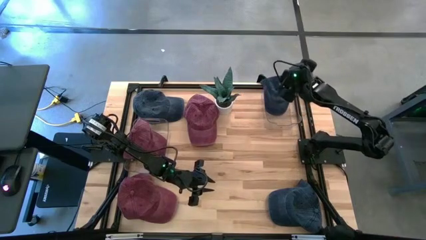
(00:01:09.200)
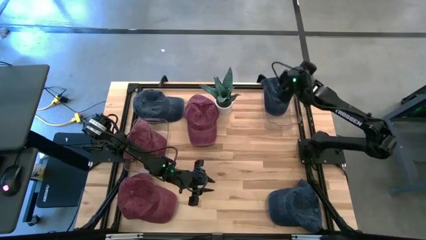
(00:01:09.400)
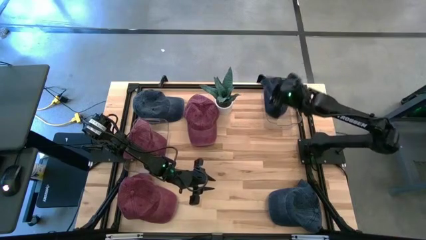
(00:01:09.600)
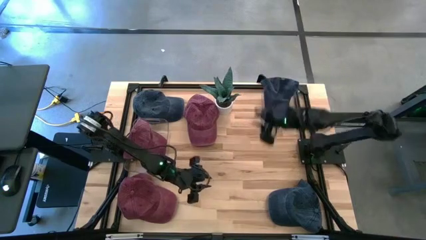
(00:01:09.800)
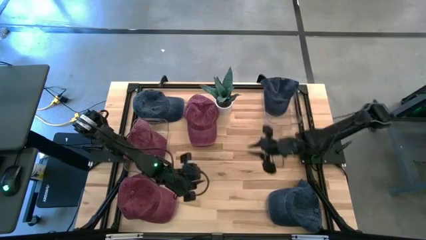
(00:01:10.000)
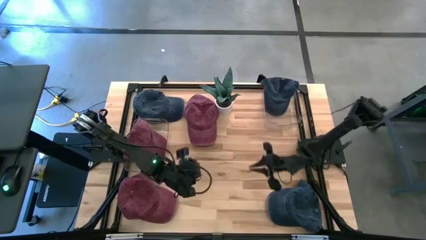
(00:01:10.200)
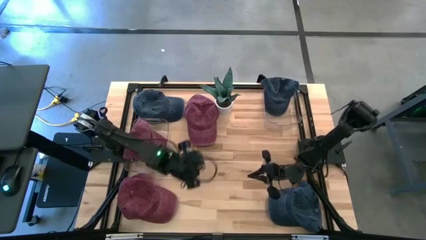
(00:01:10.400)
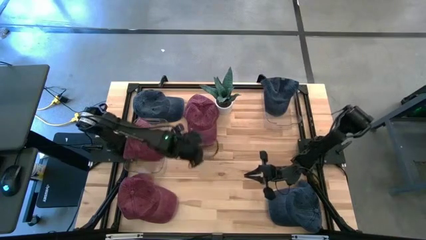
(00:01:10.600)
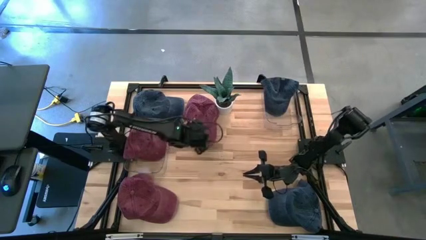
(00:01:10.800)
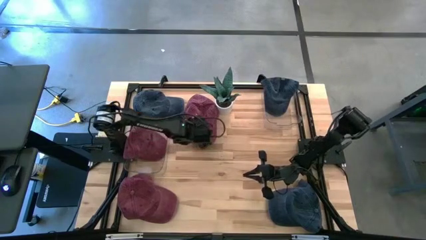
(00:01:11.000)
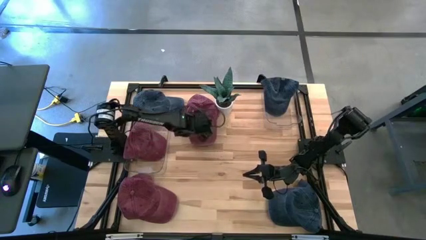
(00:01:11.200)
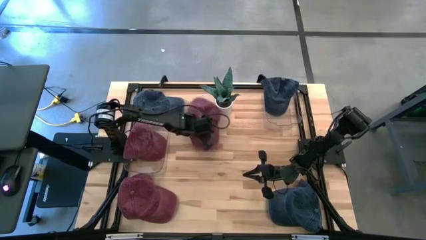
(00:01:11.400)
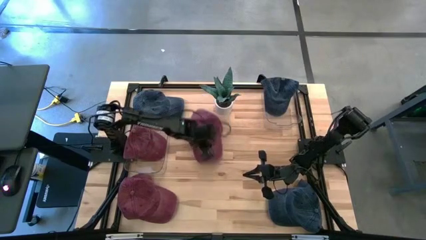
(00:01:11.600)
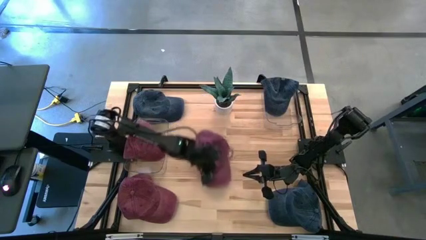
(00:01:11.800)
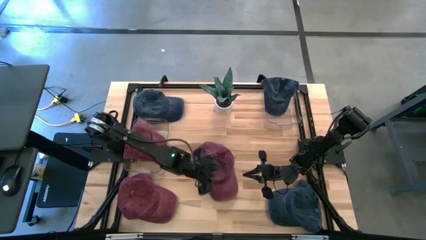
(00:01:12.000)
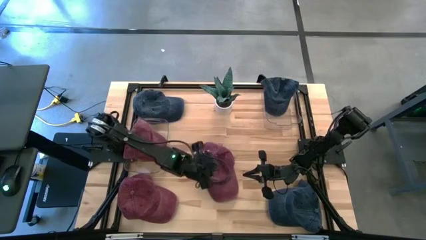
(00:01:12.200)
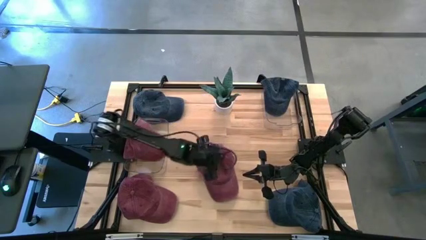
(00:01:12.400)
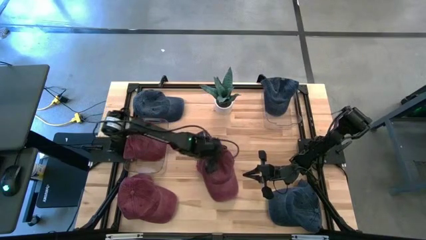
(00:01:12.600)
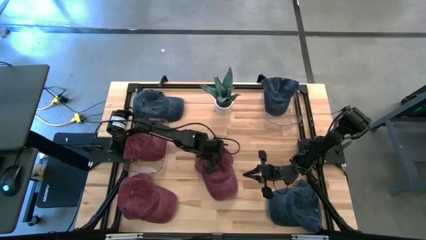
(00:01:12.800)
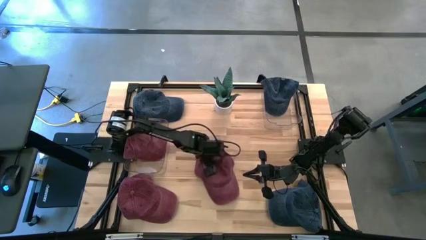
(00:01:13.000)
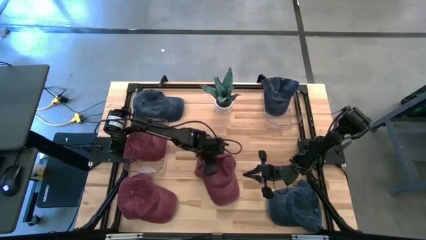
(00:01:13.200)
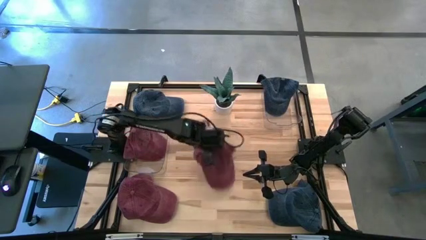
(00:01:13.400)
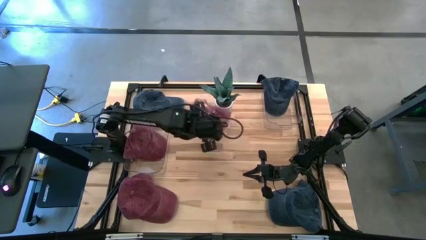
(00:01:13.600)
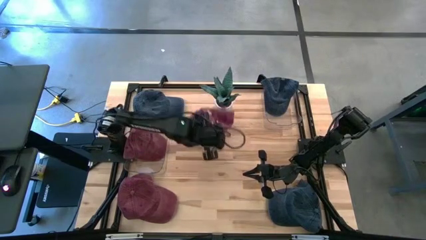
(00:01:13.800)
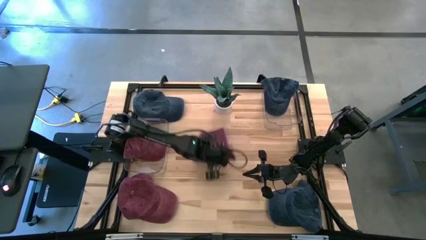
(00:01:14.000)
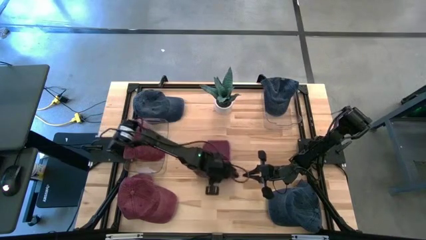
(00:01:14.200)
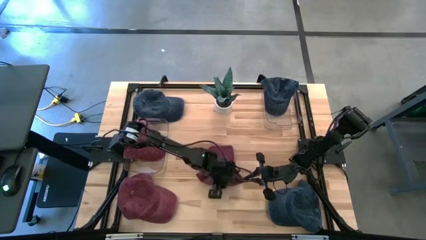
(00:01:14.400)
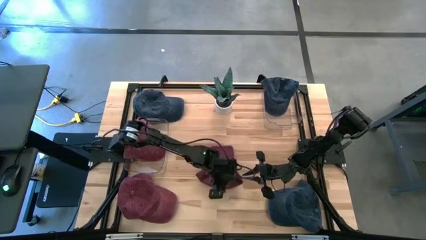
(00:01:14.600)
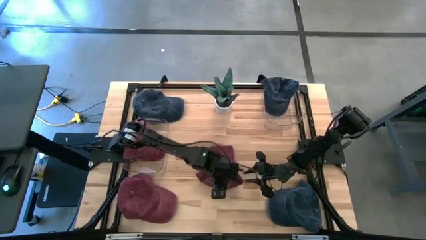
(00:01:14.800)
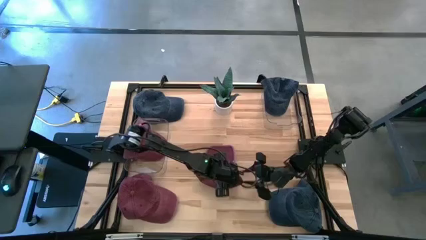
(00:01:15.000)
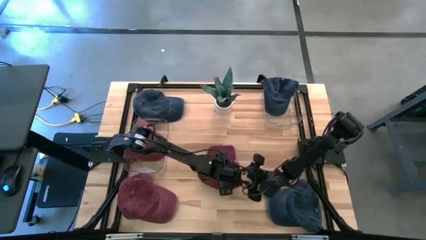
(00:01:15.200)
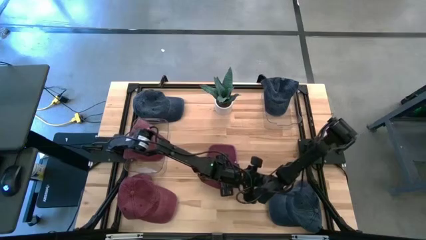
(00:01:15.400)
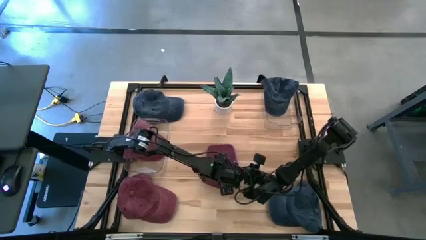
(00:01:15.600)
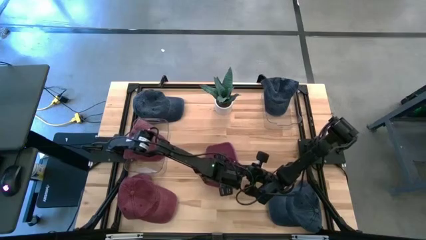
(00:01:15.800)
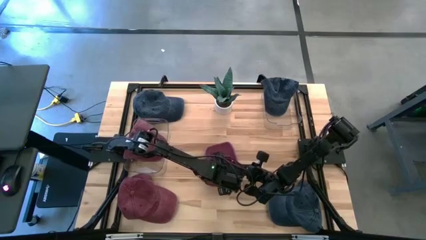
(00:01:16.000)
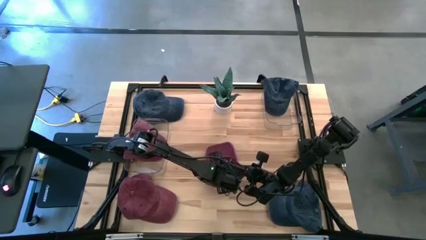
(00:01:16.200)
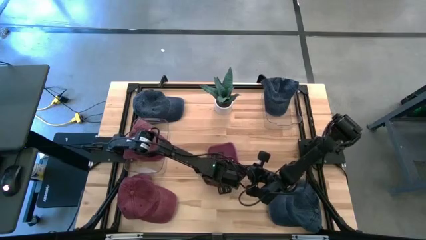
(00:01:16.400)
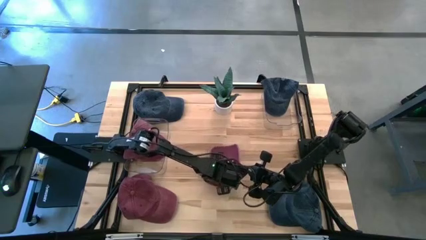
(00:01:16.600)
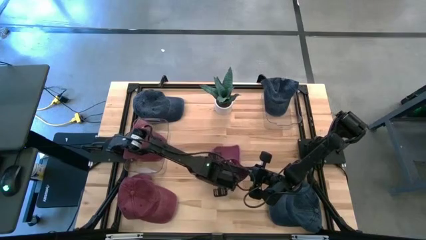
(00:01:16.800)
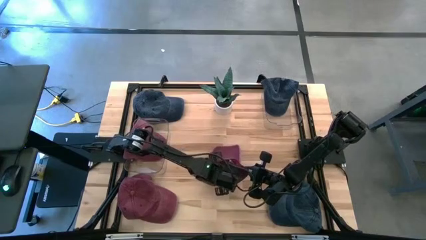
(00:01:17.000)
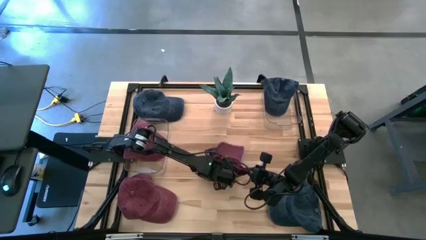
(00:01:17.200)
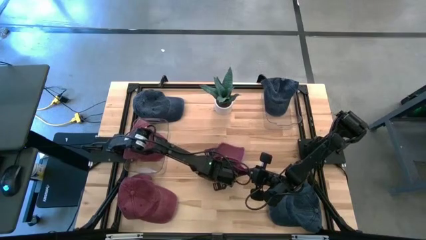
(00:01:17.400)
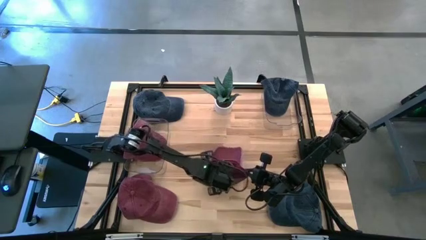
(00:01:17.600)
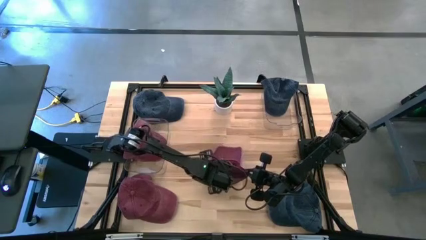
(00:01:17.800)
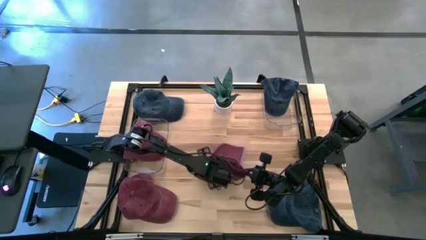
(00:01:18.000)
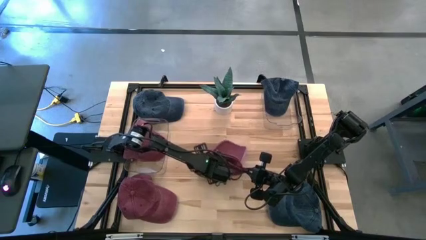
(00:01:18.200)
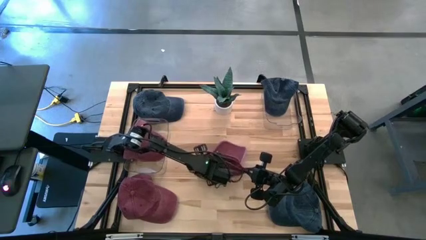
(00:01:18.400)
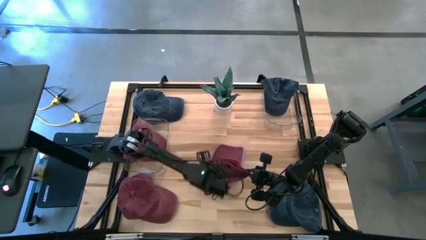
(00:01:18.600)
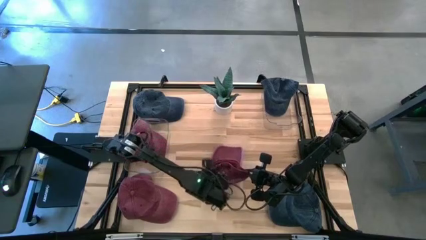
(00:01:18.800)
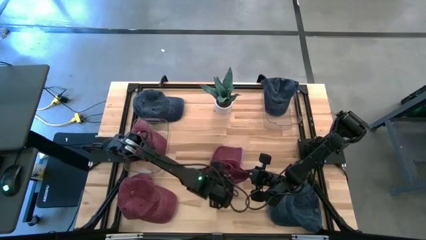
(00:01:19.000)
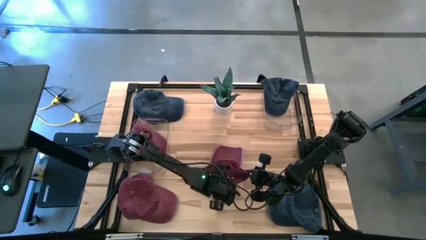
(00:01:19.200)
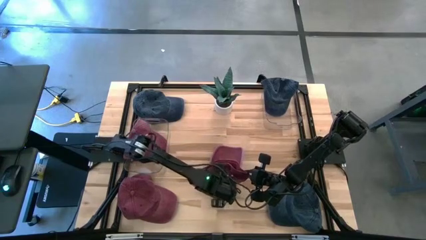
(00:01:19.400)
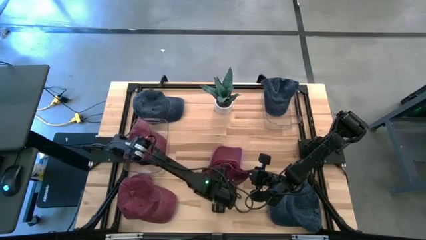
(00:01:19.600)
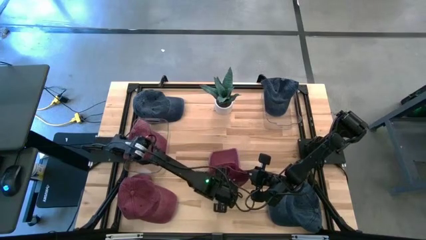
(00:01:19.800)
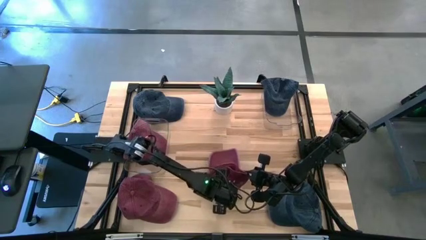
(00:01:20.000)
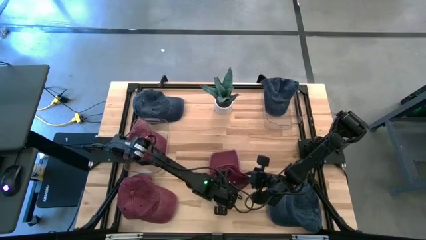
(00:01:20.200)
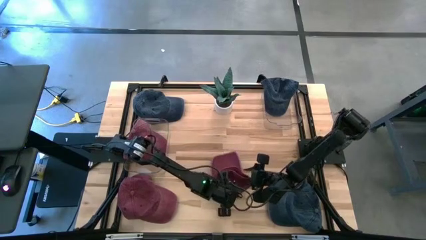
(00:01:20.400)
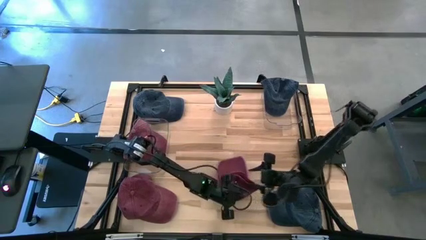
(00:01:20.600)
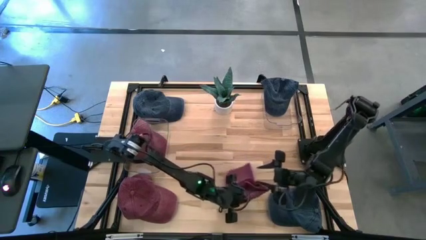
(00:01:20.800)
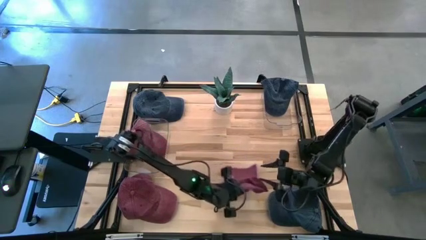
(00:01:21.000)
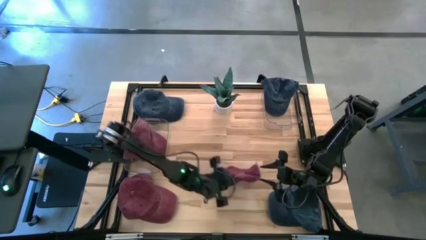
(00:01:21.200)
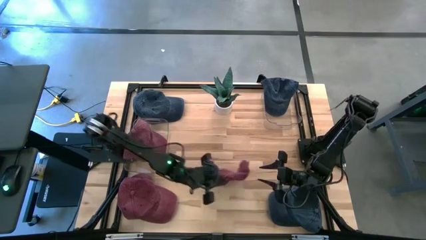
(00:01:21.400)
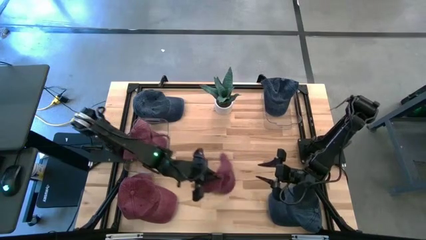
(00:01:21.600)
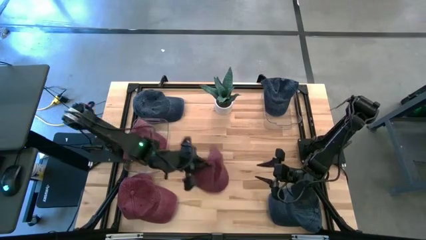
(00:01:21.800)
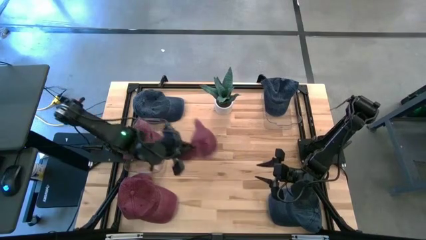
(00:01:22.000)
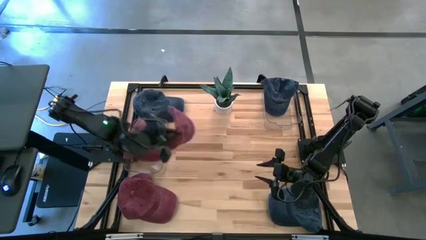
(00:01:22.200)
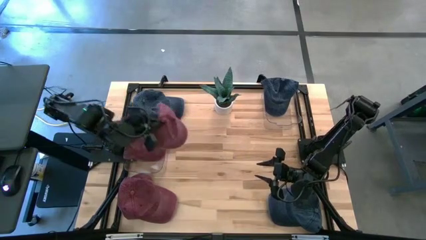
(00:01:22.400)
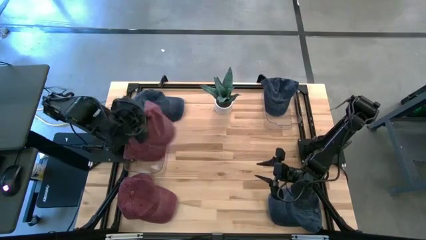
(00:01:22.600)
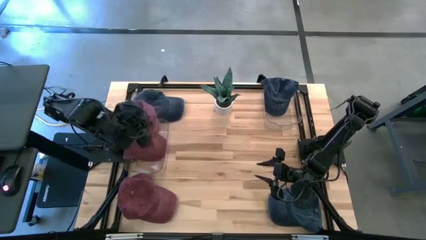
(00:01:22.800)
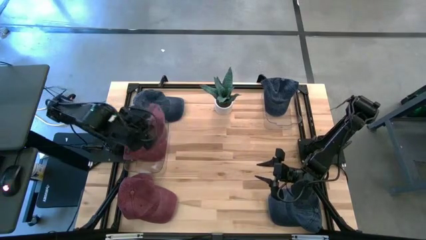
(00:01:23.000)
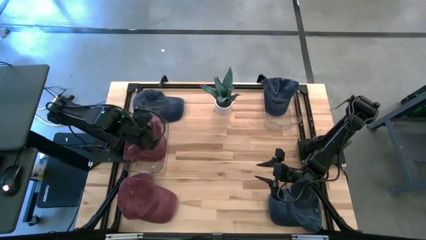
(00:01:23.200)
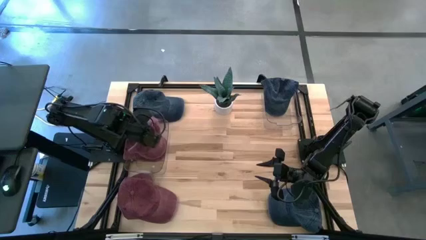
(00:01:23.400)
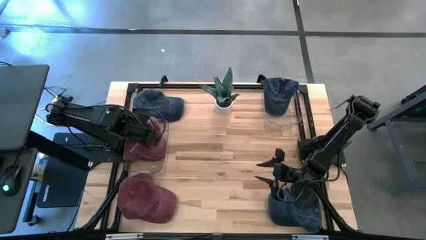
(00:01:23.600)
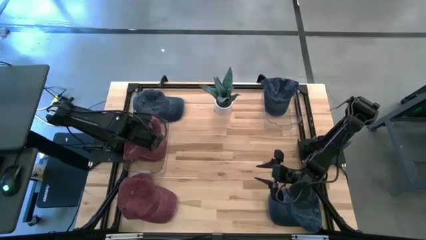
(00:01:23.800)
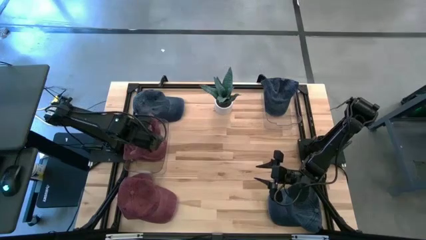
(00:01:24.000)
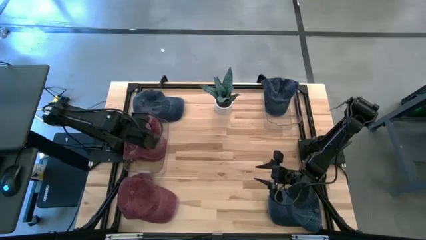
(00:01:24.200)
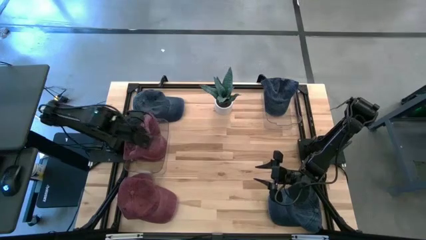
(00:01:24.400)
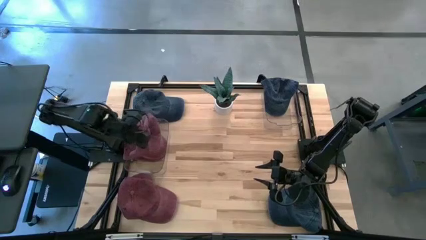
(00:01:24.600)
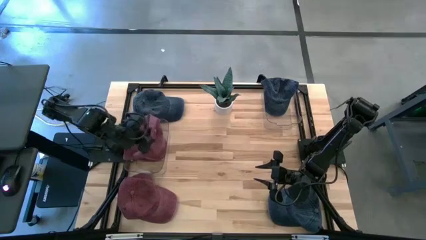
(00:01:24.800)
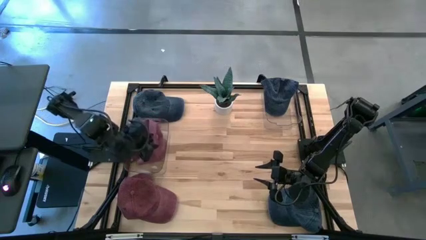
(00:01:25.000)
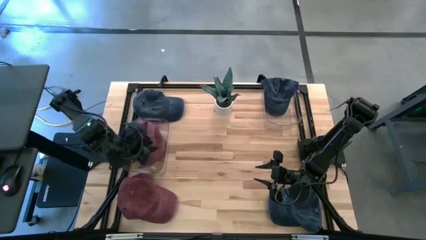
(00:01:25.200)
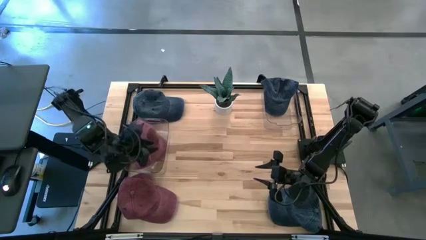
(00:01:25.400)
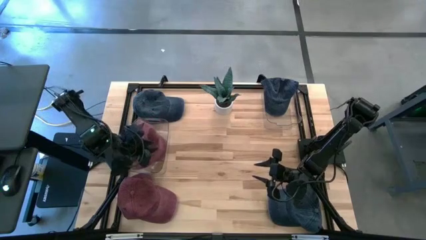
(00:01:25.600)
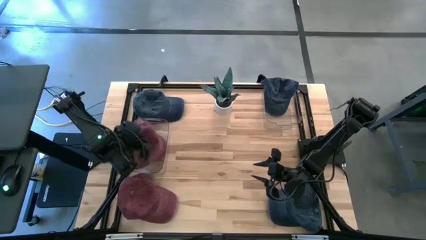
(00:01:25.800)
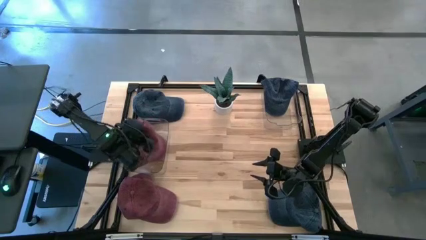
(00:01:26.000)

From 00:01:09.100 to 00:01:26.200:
Task: Pick & Place hat
Put the top red cap into the left transparent bin
